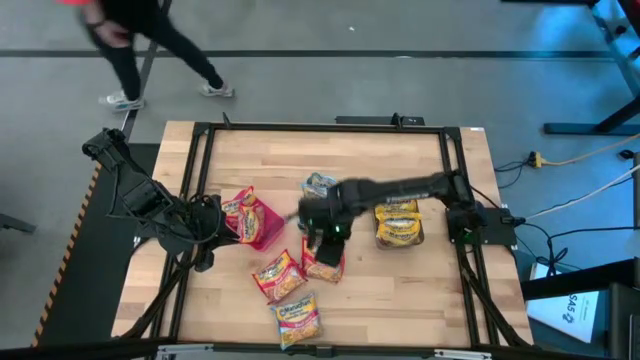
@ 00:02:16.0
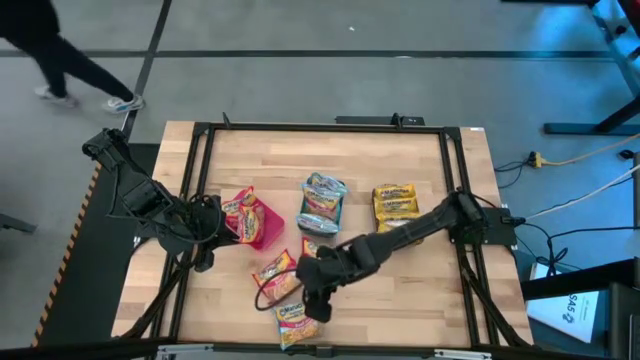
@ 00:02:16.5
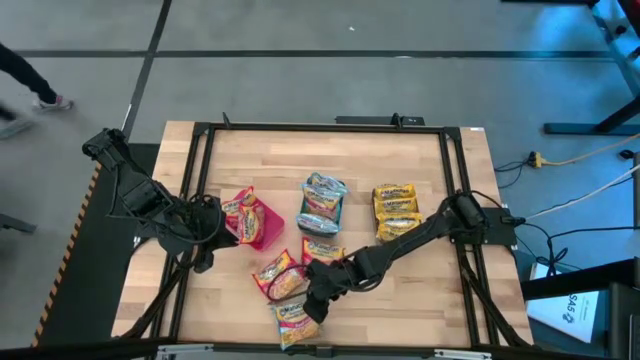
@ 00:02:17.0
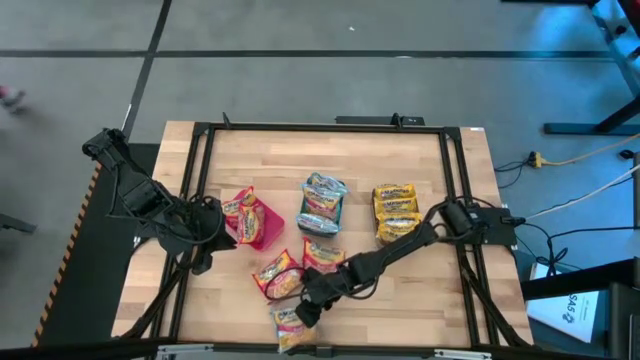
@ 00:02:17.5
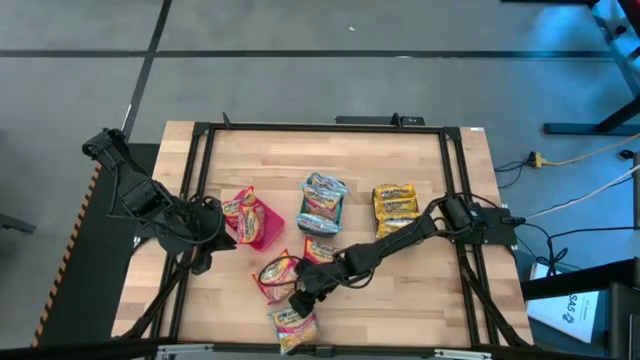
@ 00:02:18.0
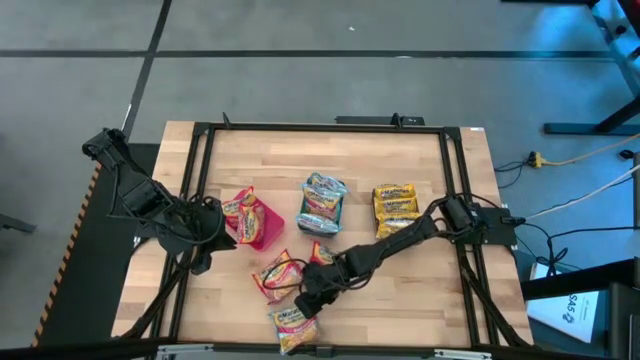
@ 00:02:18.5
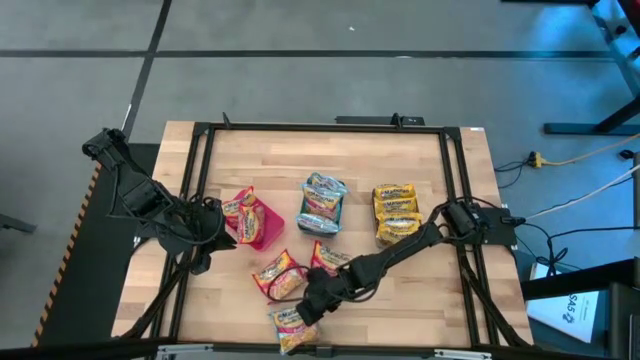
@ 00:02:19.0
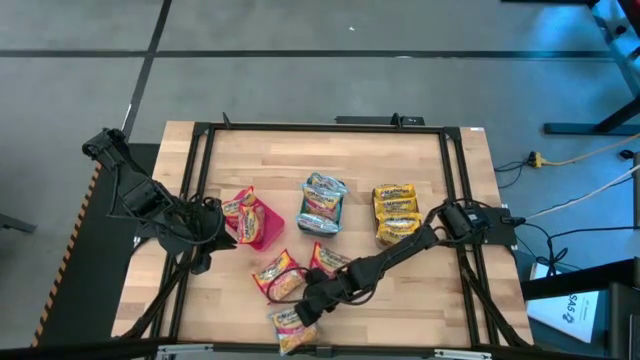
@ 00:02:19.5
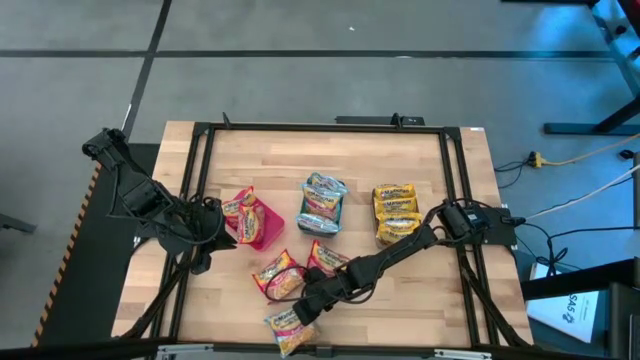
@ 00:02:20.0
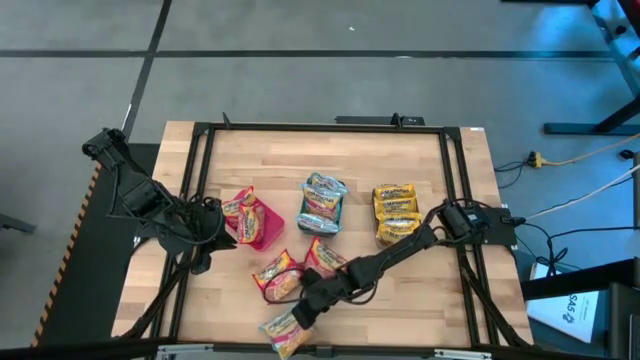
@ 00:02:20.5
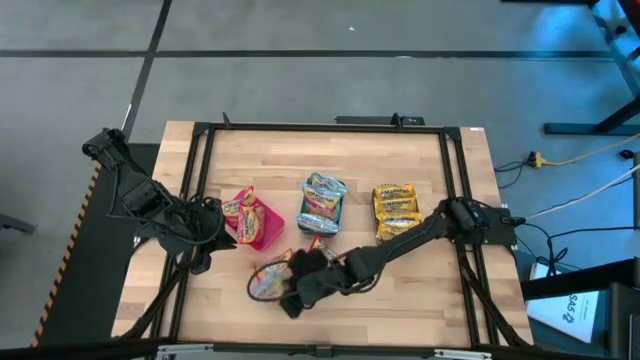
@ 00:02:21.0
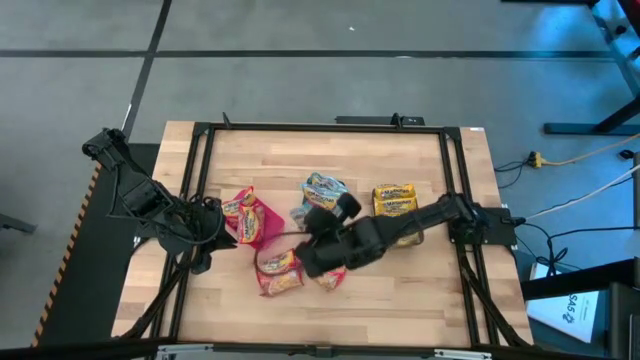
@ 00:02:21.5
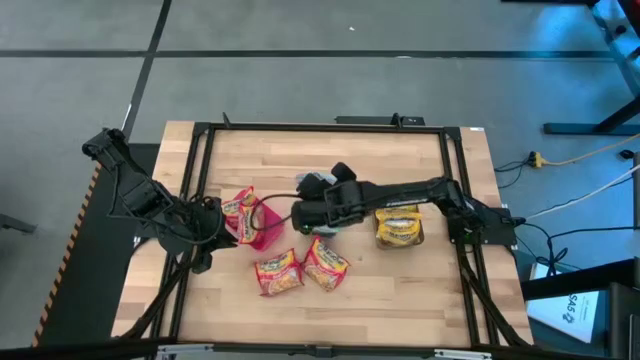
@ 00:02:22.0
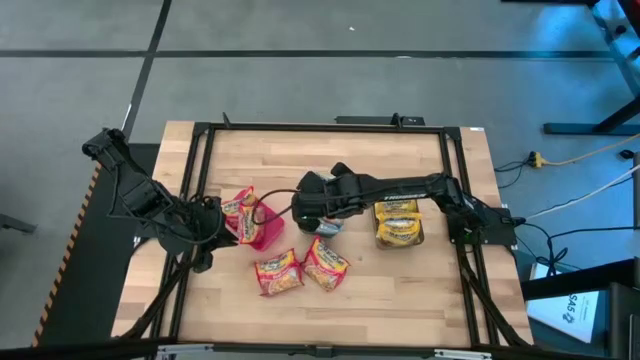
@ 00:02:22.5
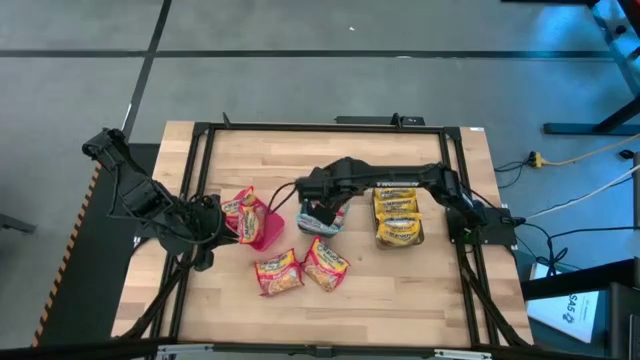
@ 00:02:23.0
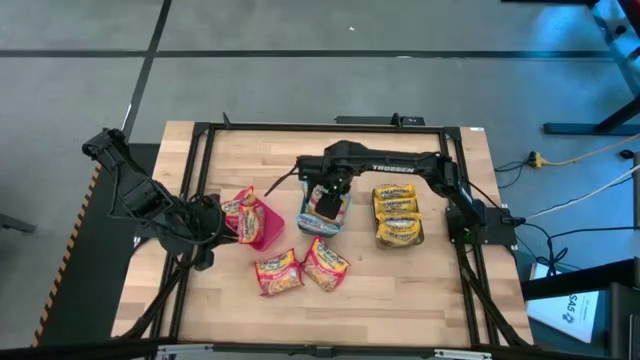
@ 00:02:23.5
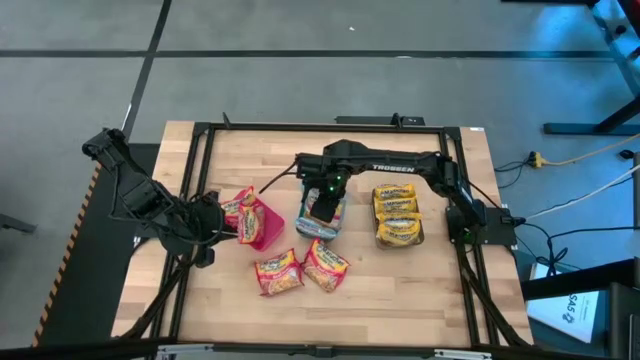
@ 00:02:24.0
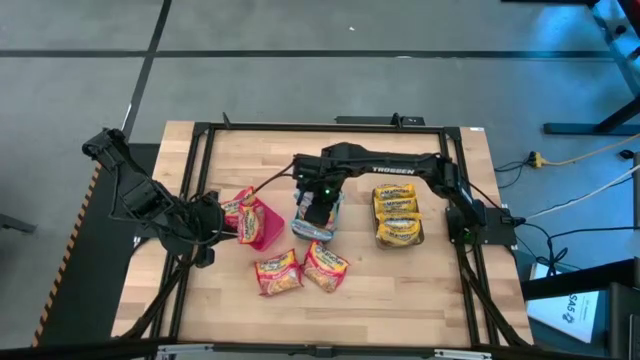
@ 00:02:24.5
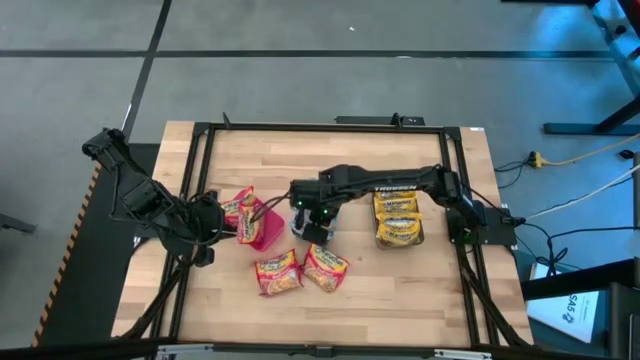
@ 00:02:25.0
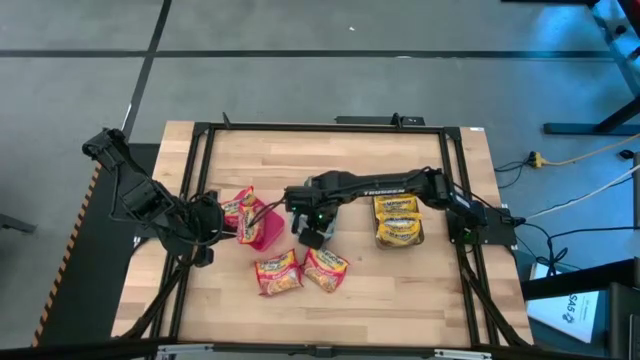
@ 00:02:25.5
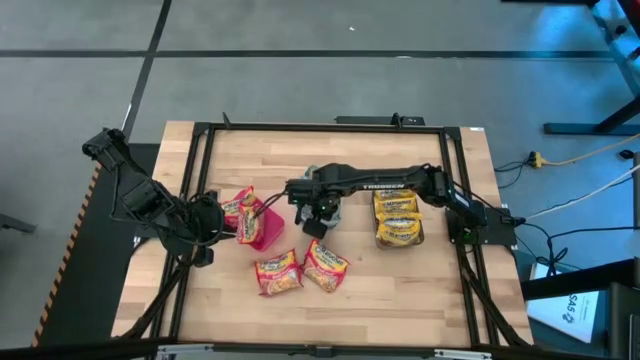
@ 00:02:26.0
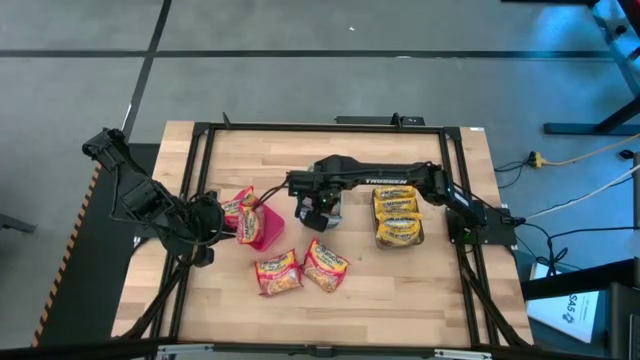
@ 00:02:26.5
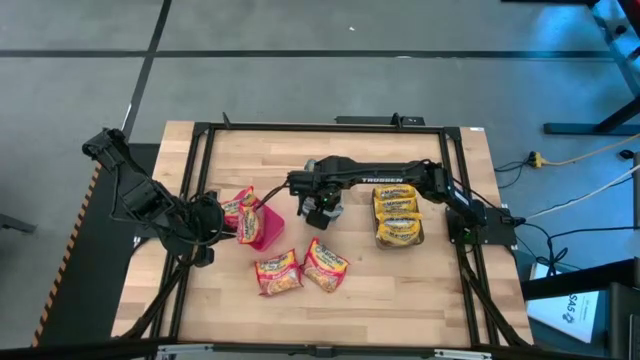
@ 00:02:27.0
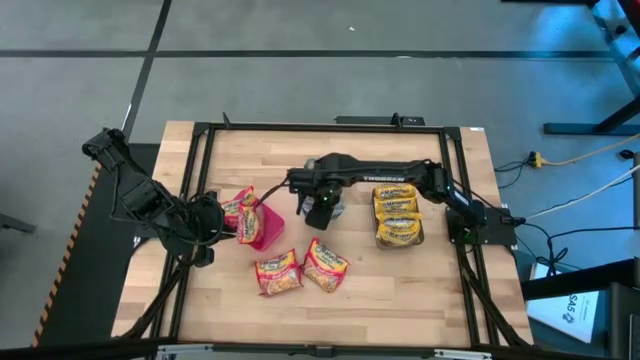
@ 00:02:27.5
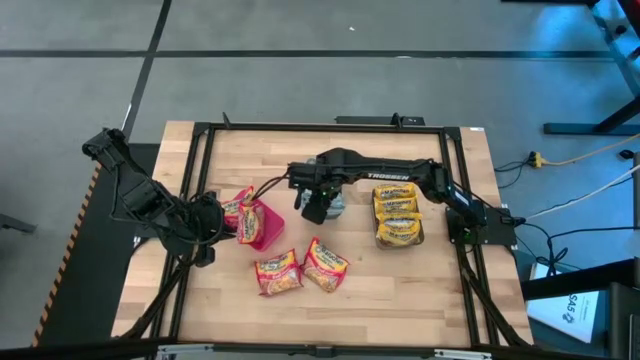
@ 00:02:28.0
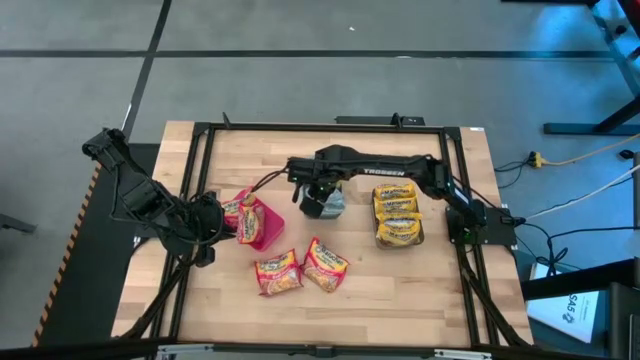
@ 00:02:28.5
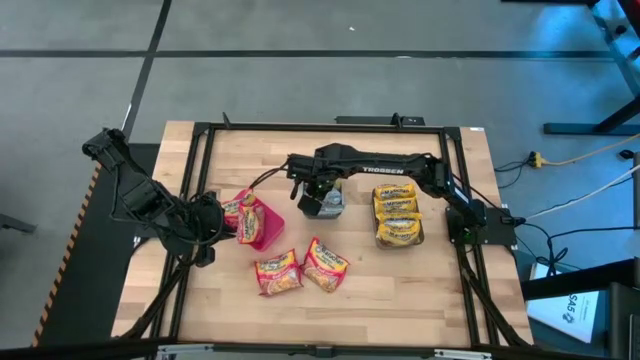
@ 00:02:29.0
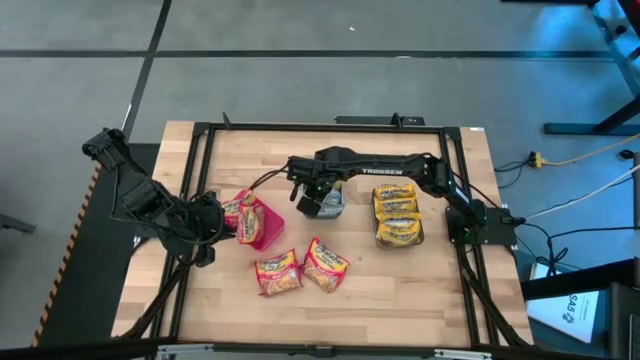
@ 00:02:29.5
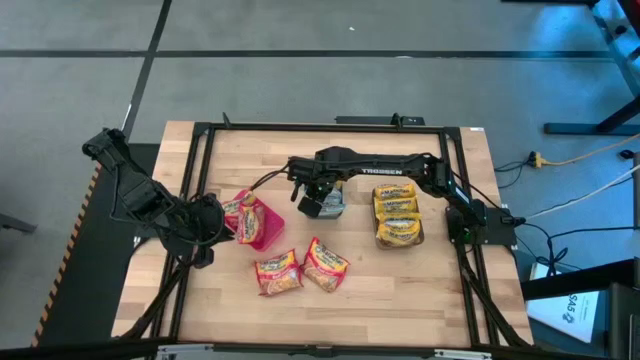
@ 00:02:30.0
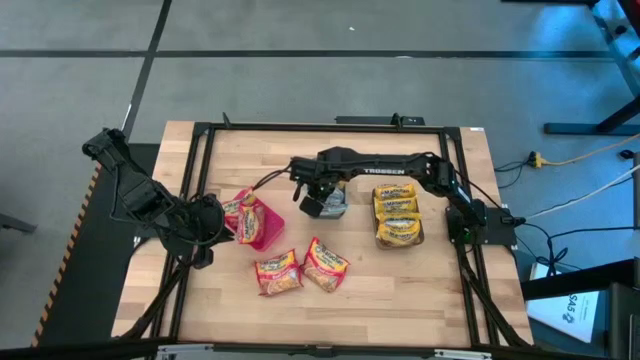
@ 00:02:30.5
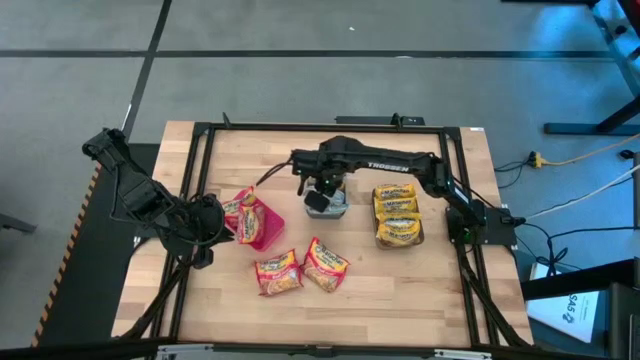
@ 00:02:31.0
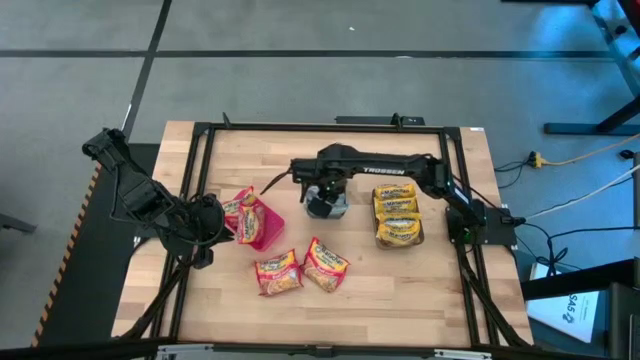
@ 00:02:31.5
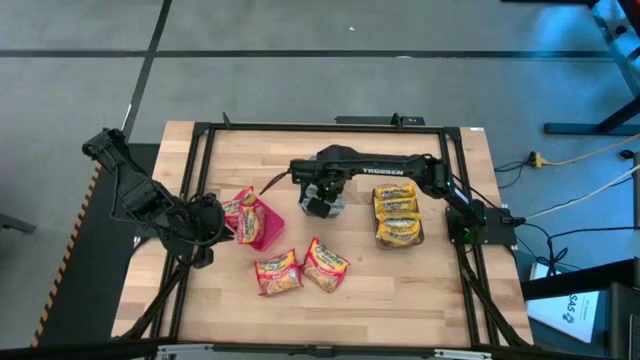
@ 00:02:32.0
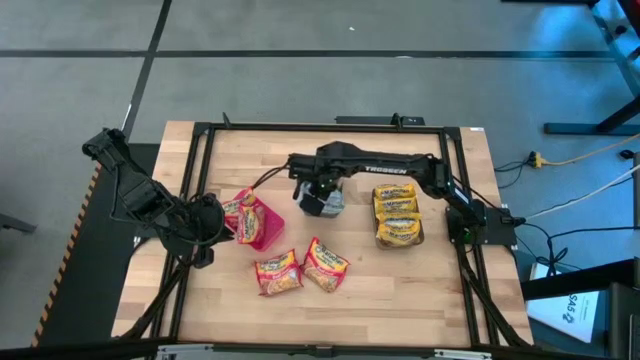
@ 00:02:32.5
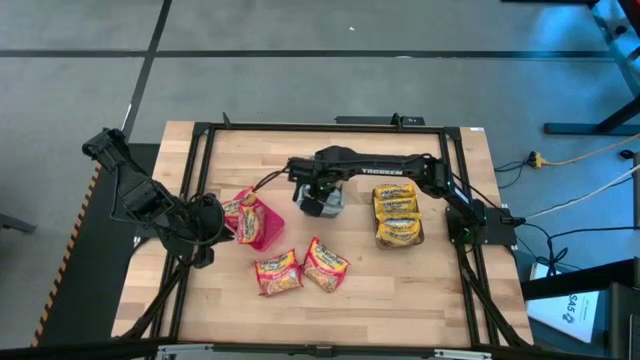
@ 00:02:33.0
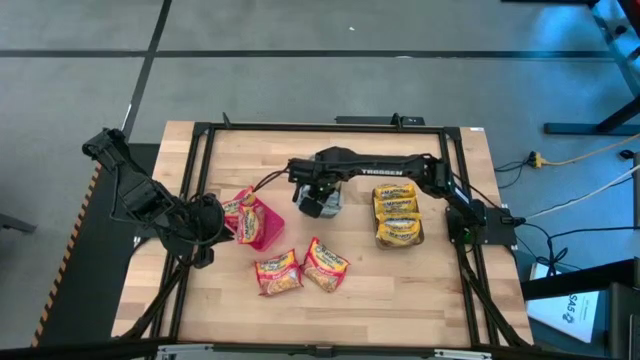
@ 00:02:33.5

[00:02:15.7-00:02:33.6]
Task: Sort Maruchan noodles
Put the blue noodle pack into the blue bin

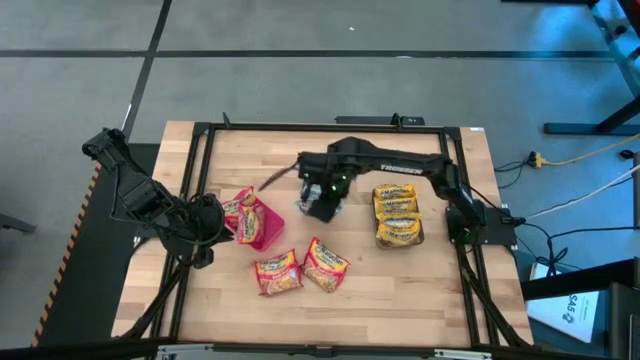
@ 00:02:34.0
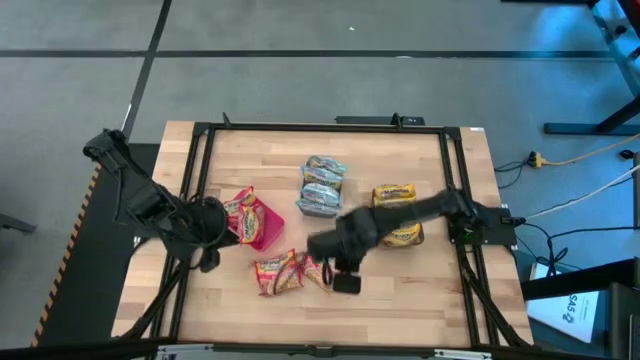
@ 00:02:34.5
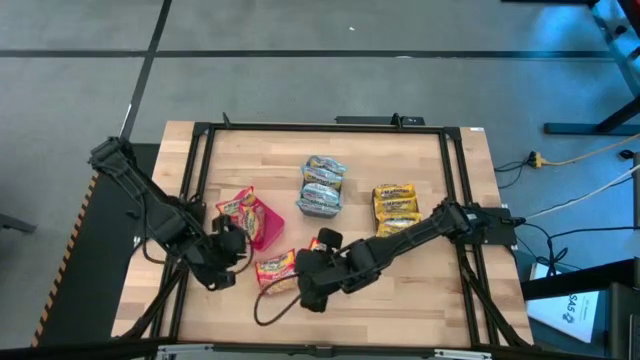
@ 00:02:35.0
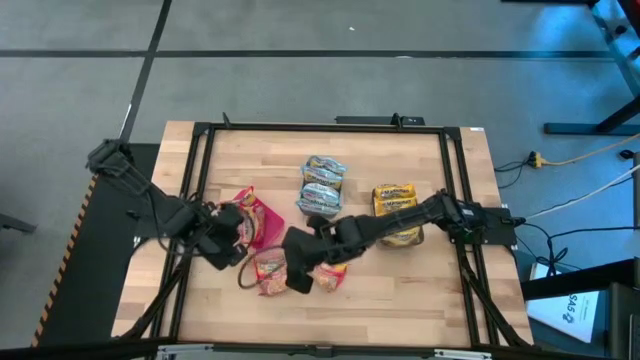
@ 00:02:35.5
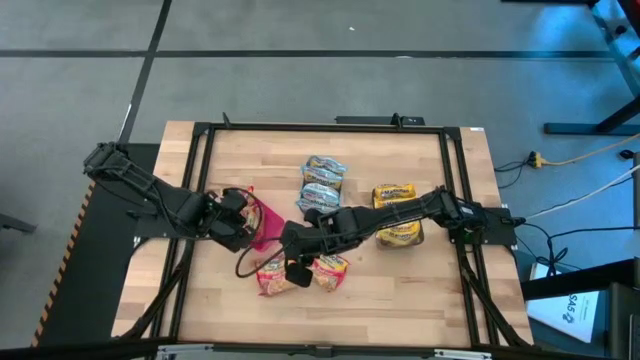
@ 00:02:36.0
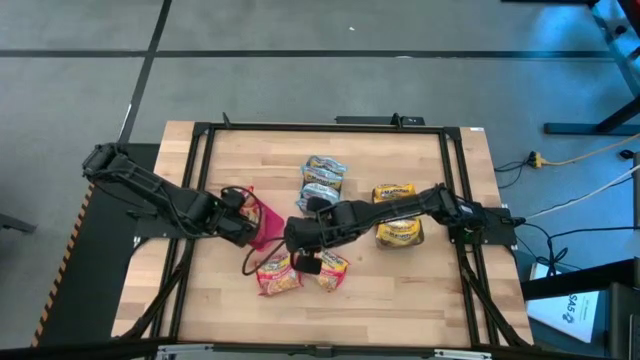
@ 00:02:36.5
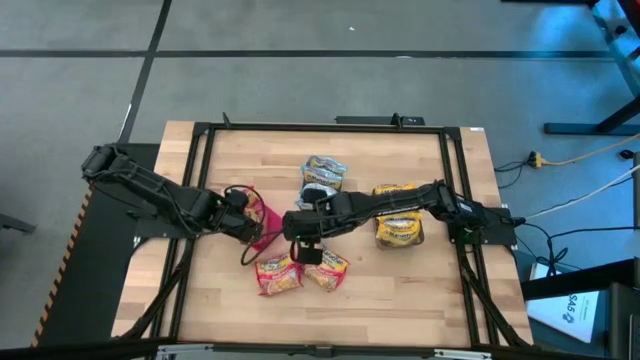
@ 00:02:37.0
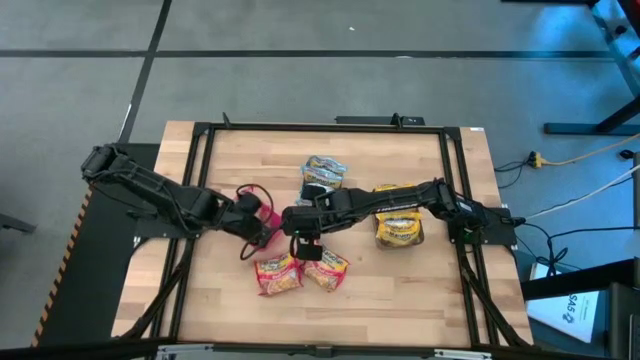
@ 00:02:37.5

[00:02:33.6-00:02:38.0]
Adjust the red noodle pack in the red bin
